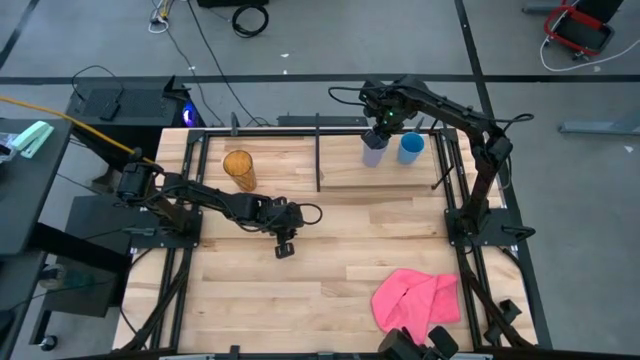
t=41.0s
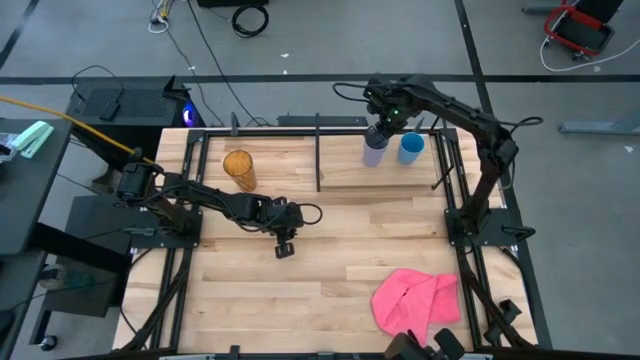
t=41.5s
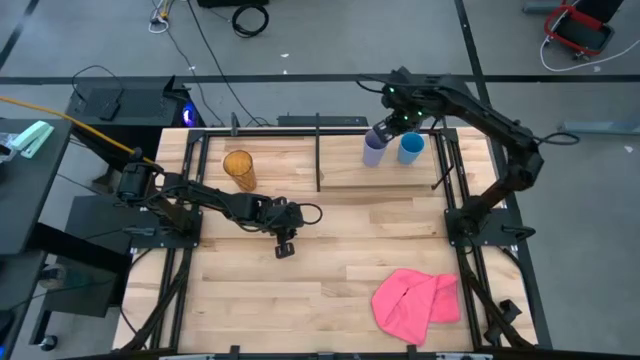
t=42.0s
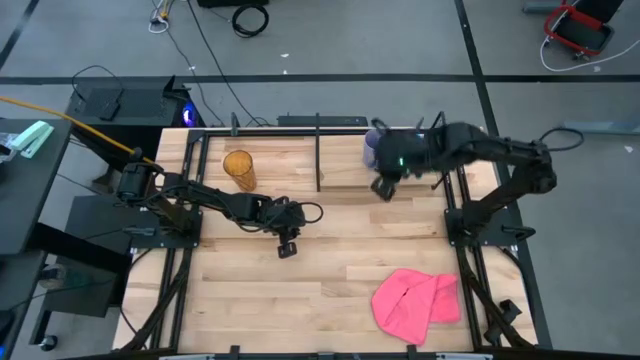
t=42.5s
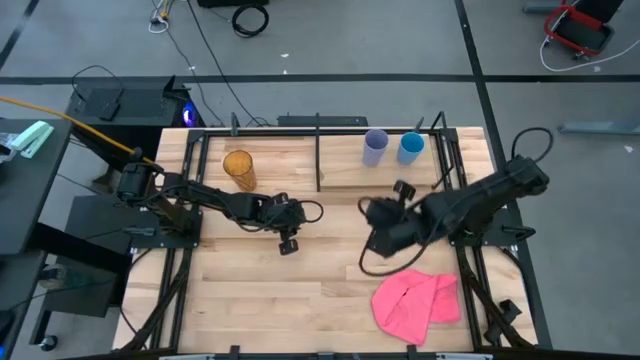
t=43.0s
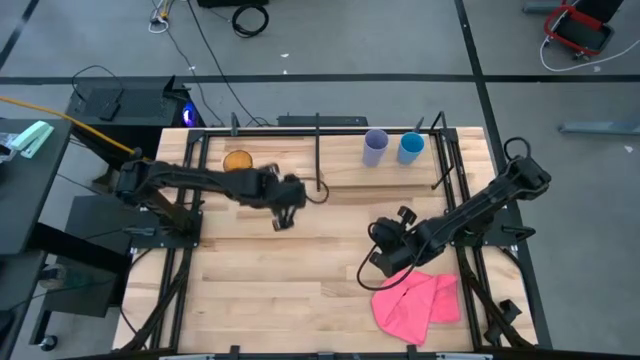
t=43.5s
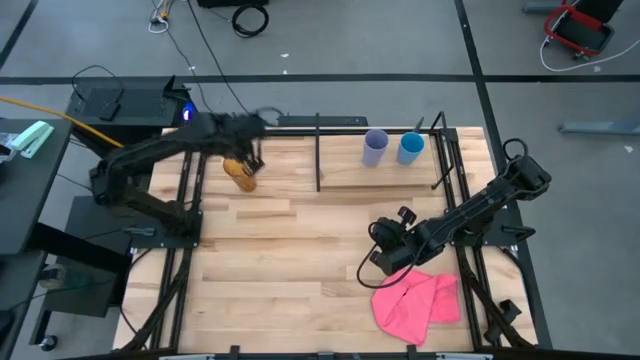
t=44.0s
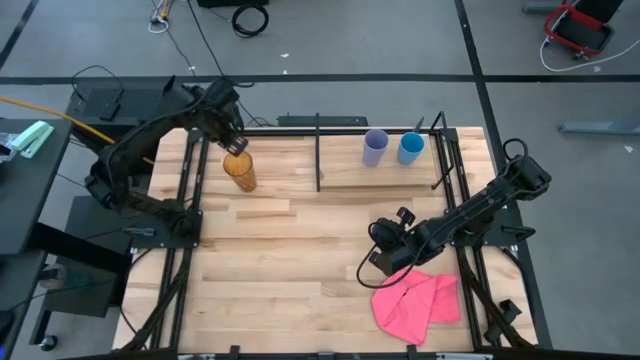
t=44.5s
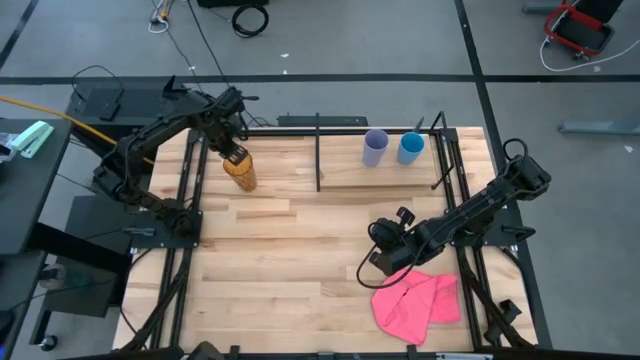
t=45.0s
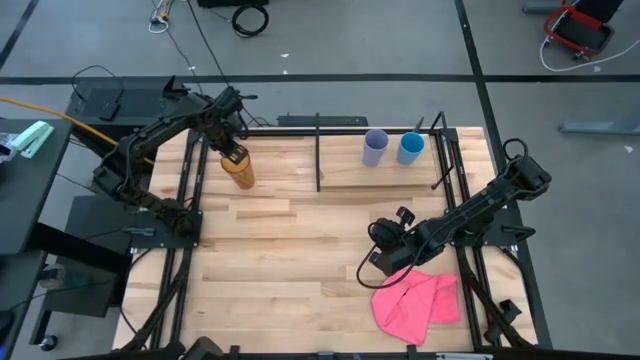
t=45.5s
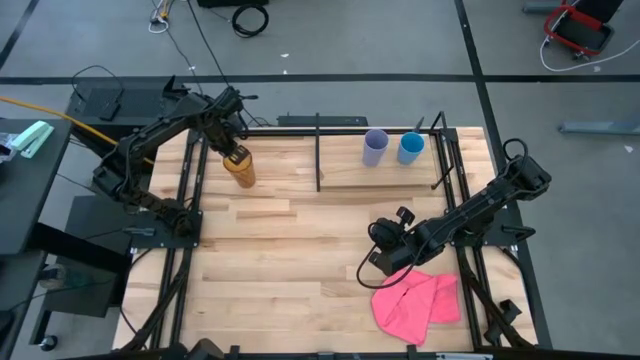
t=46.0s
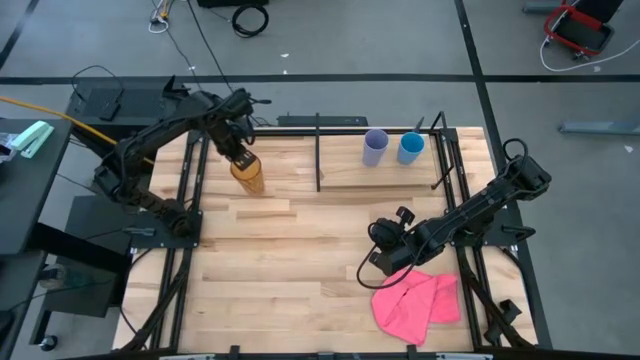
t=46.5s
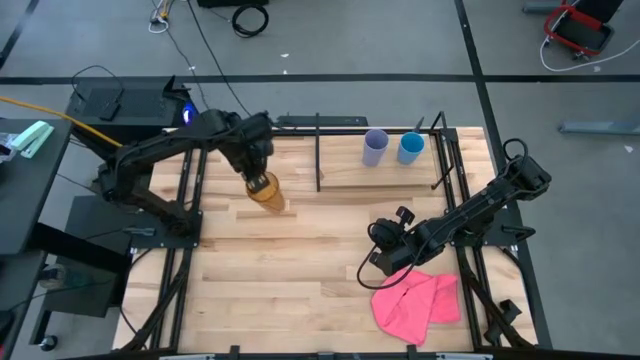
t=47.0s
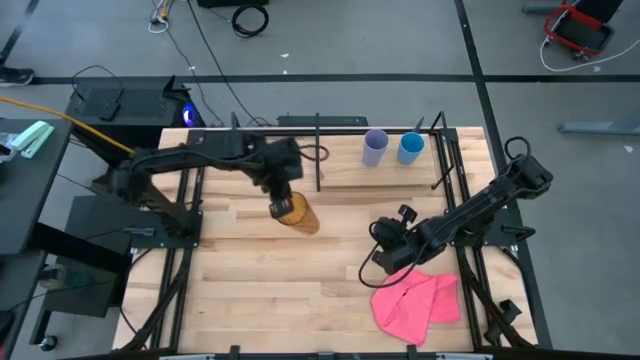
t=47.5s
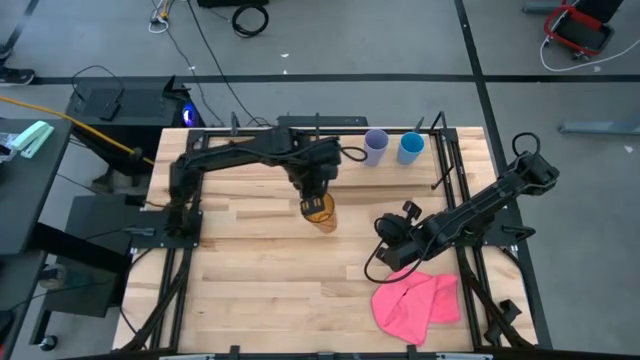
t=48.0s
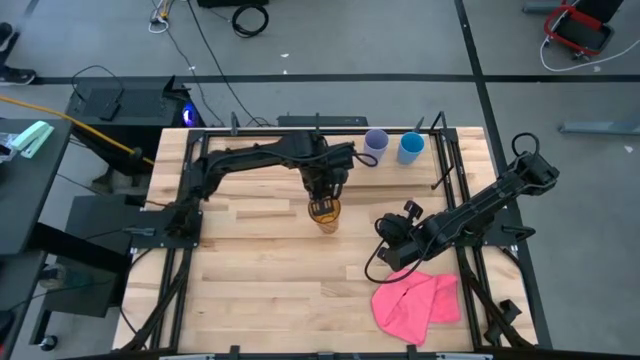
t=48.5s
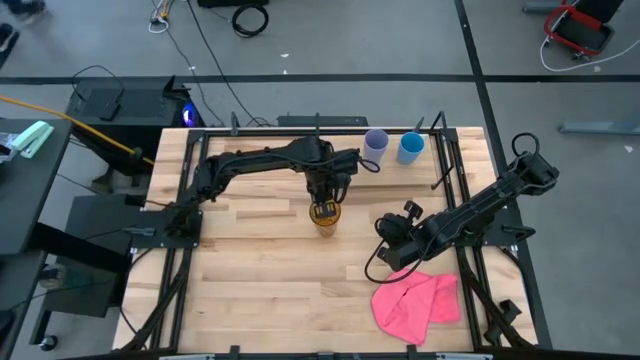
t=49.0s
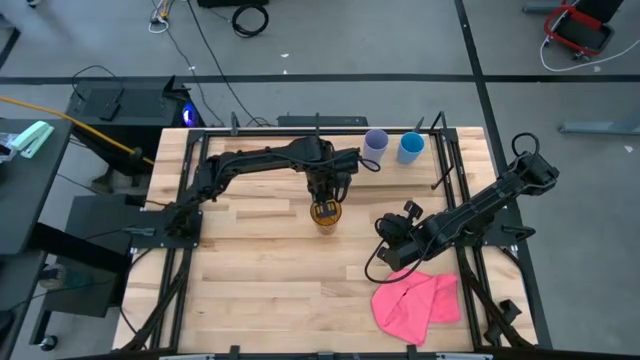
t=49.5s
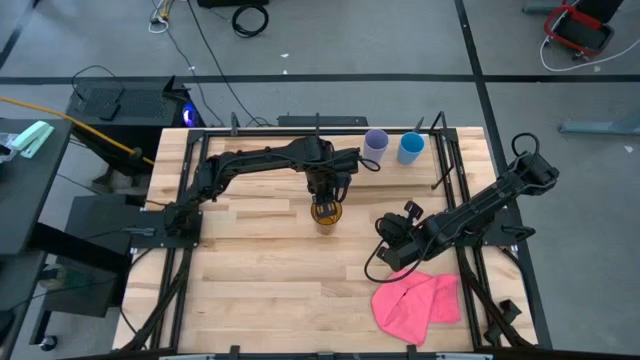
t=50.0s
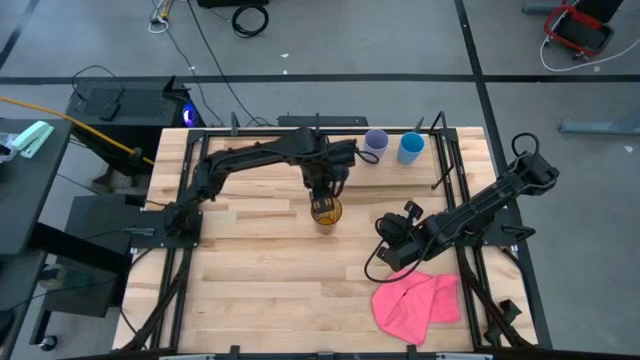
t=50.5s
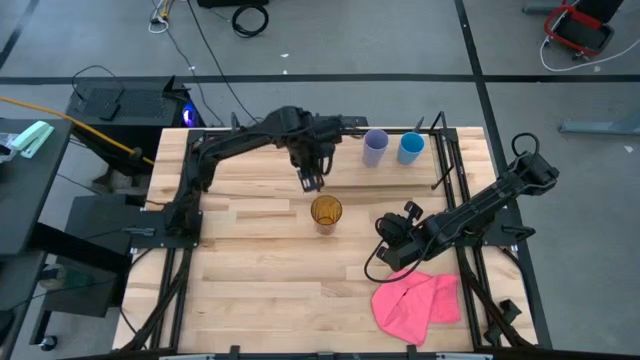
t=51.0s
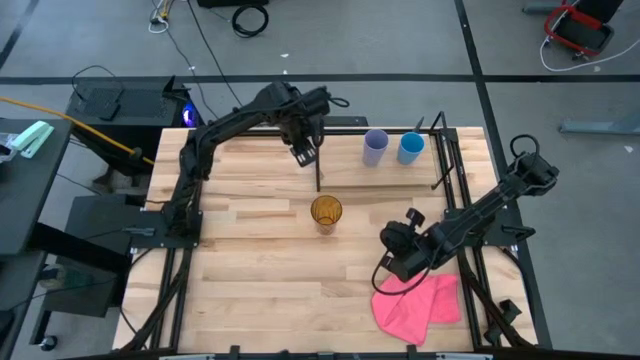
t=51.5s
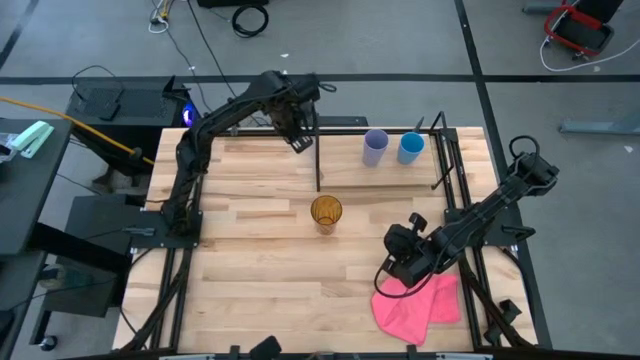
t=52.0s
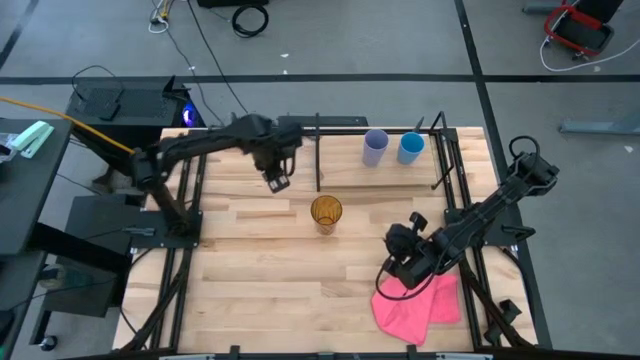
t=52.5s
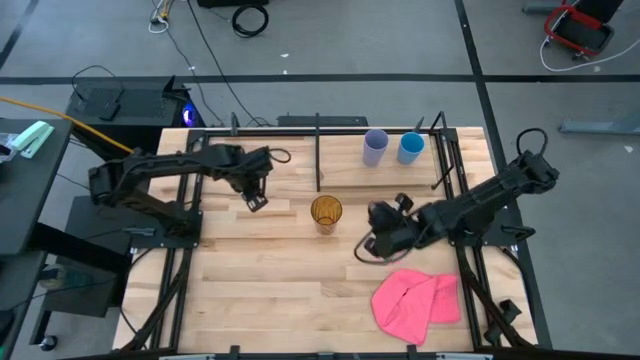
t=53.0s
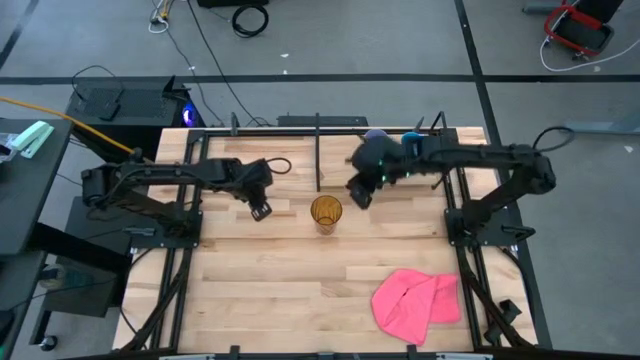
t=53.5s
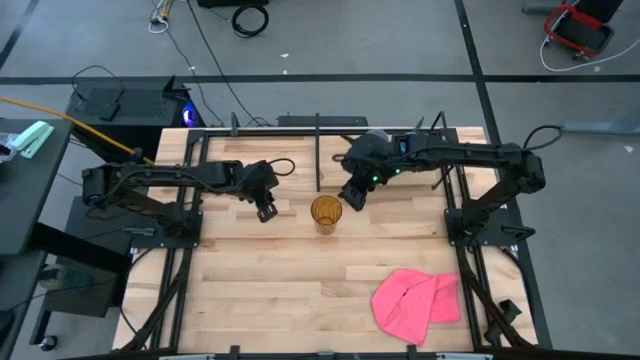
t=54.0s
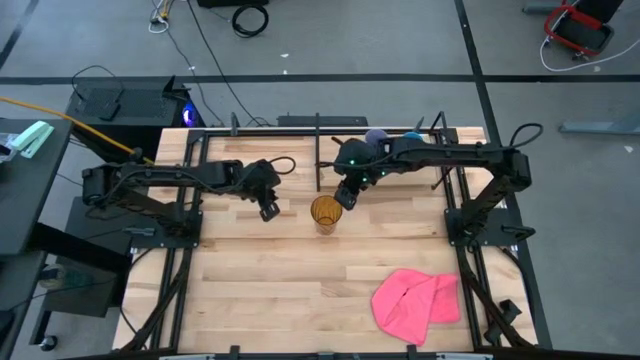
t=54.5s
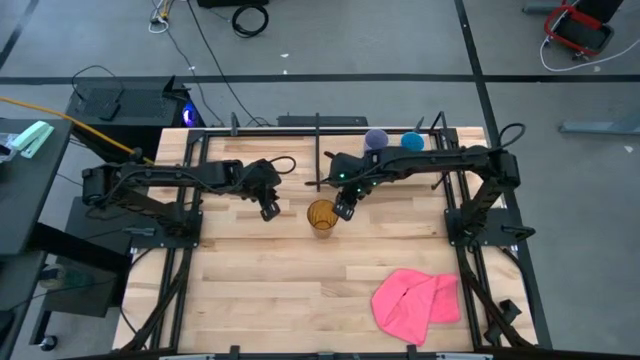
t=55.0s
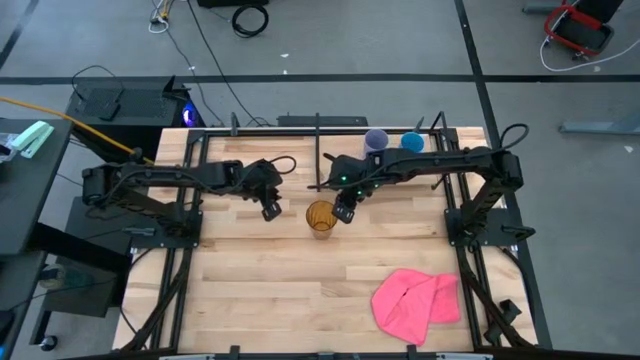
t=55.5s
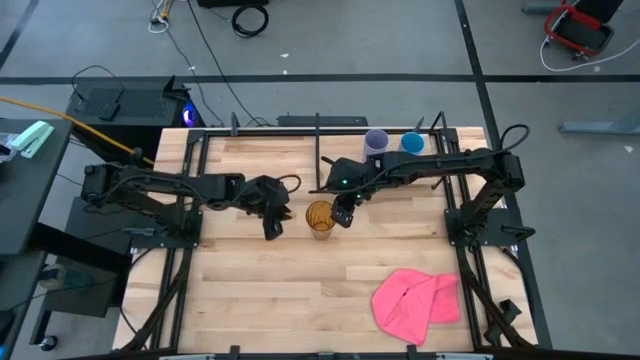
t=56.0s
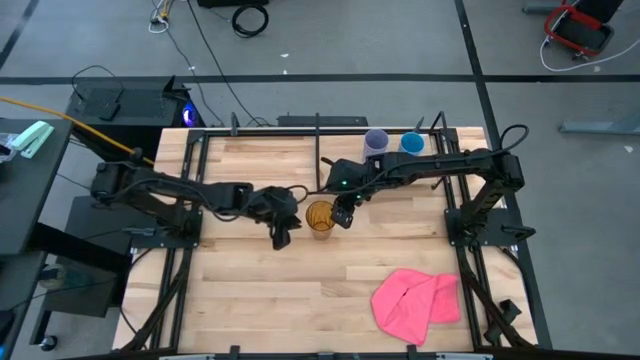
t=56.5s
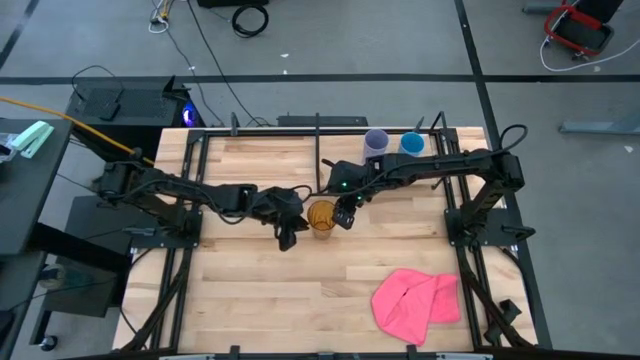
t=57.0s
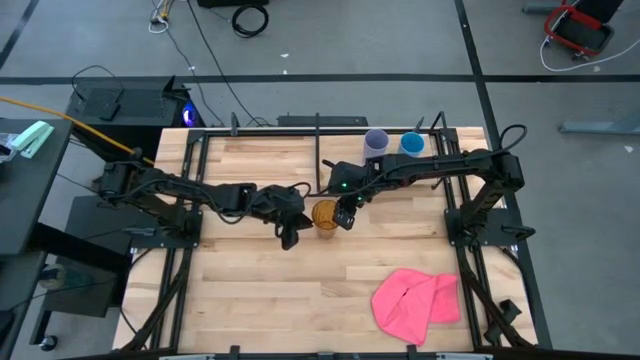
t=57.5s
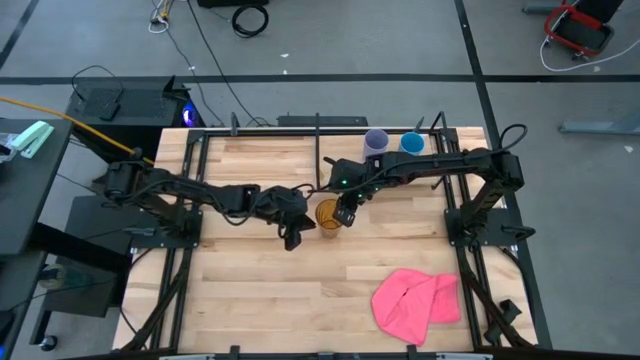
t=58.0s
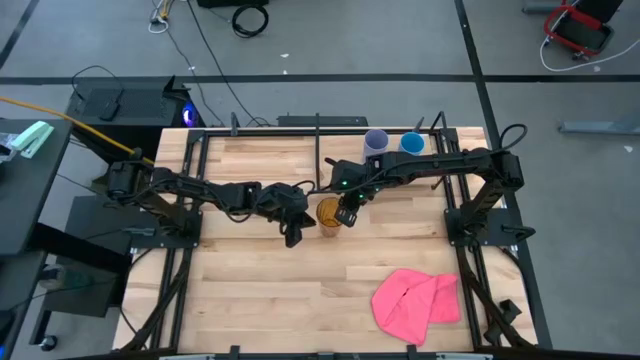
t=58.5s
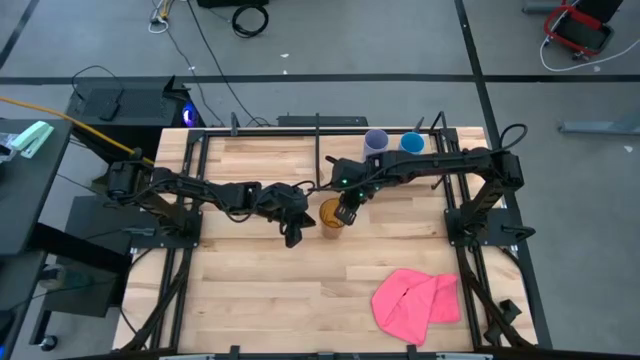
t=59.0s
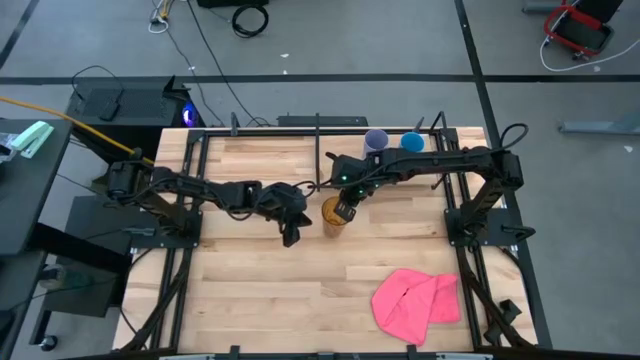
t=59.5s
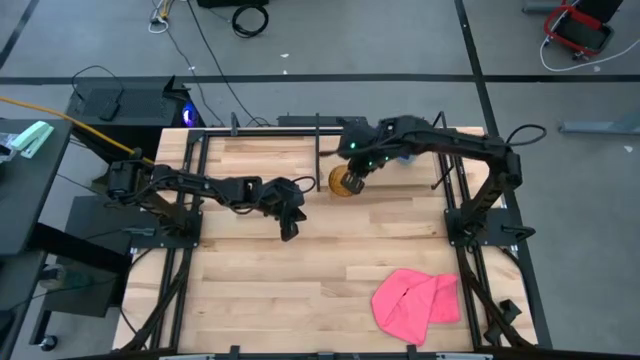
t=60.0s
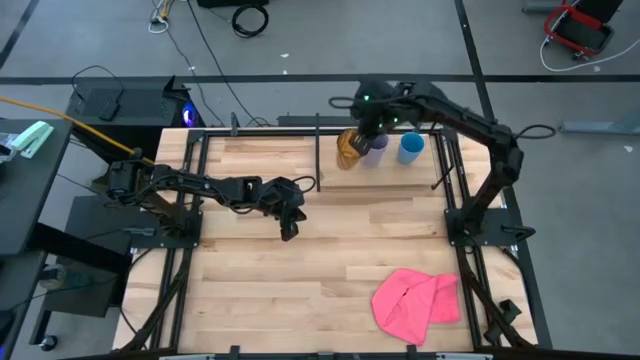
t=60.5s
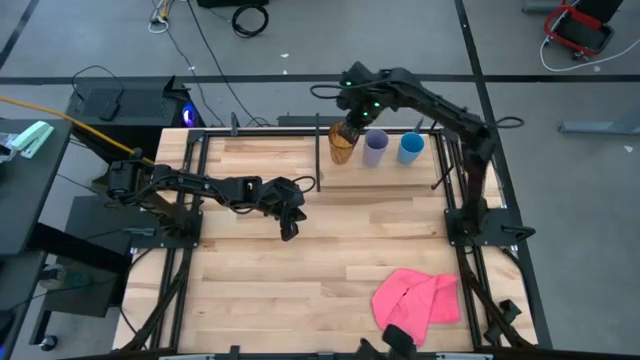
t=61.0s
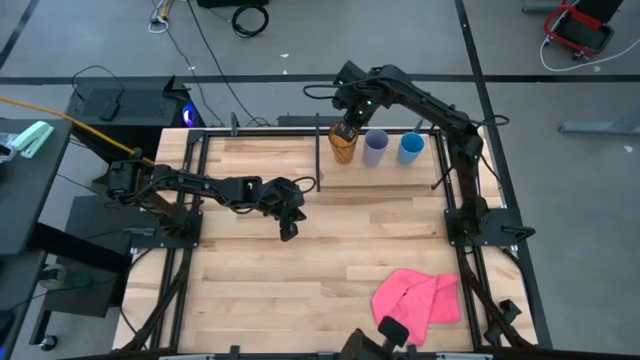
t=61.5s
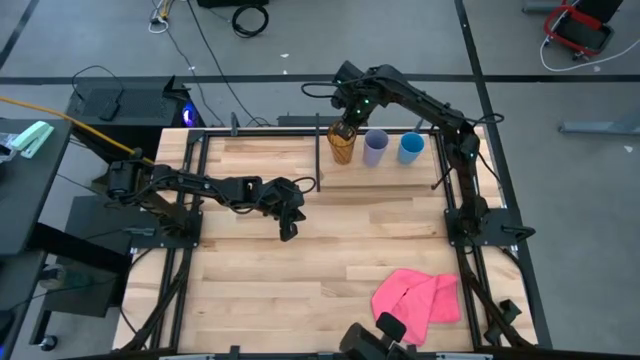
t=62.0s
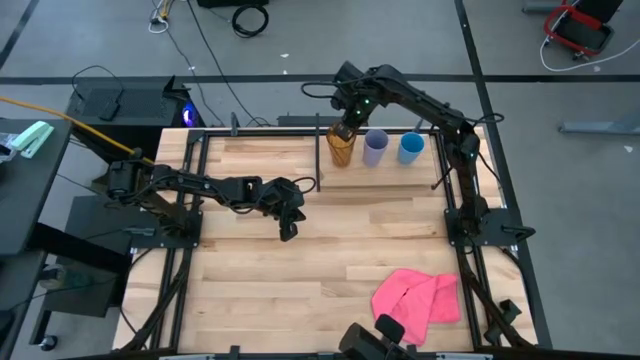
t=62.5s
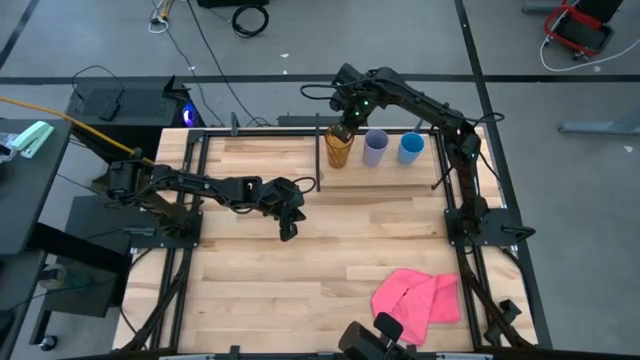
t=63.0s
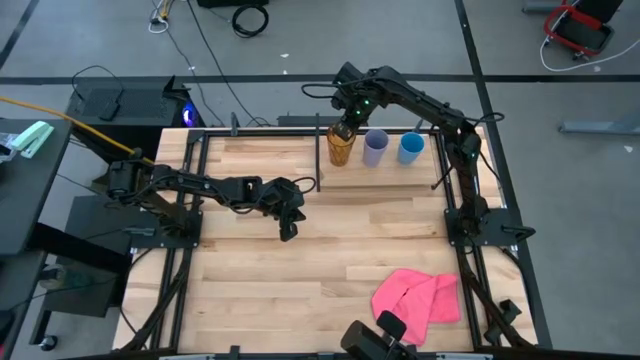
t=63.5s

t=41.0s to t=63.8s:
Task: Stack small to large cups/mugs on shelf
Put the brown cup on the shelf
